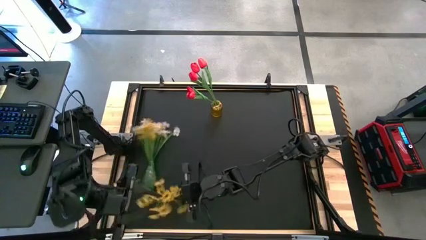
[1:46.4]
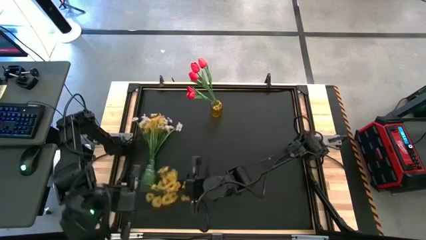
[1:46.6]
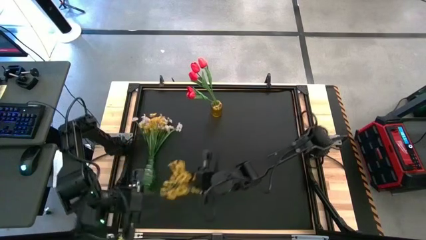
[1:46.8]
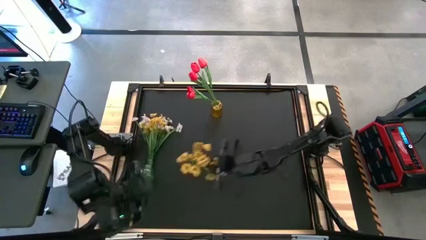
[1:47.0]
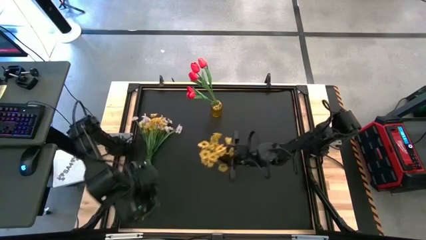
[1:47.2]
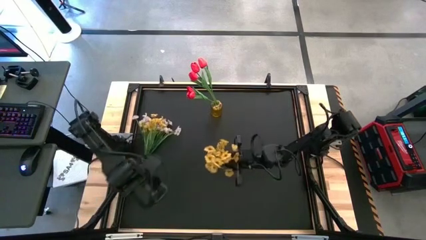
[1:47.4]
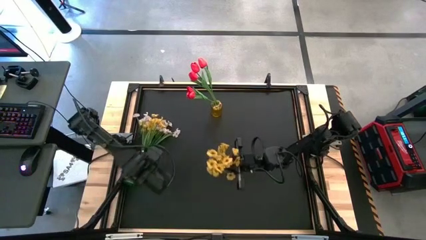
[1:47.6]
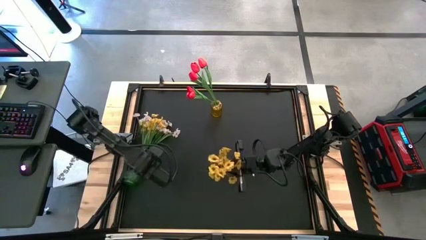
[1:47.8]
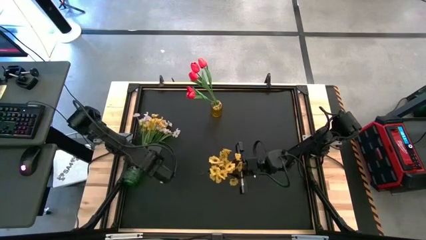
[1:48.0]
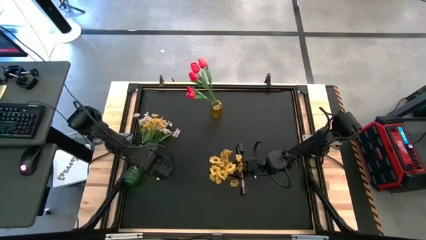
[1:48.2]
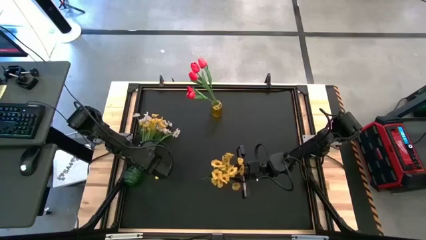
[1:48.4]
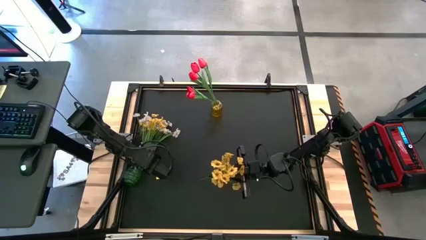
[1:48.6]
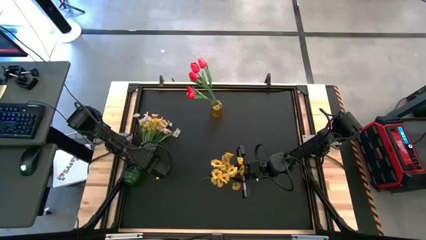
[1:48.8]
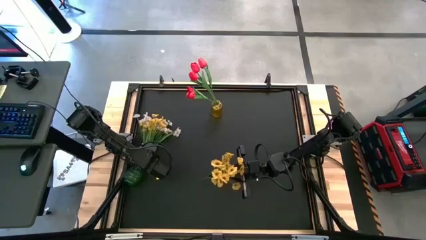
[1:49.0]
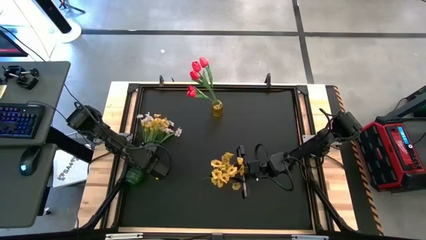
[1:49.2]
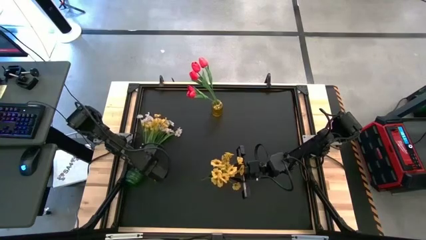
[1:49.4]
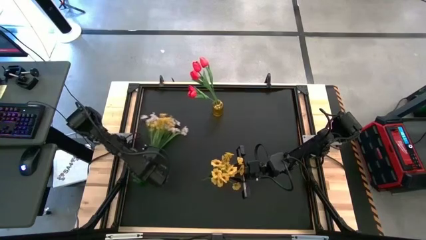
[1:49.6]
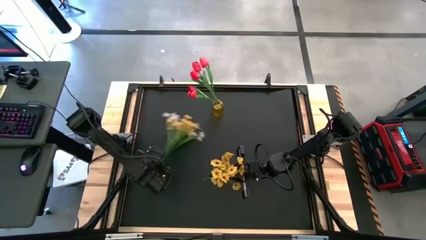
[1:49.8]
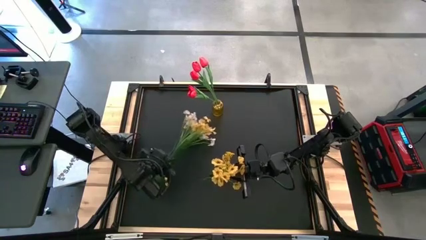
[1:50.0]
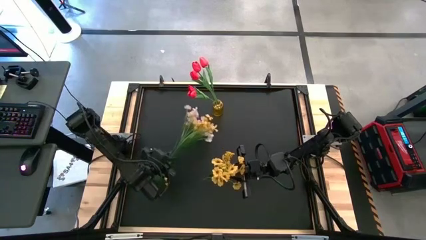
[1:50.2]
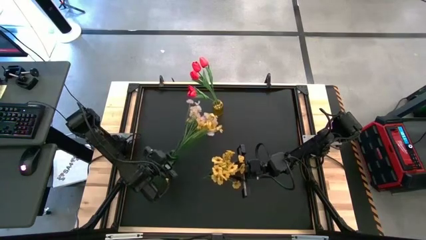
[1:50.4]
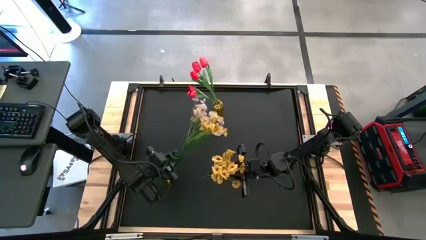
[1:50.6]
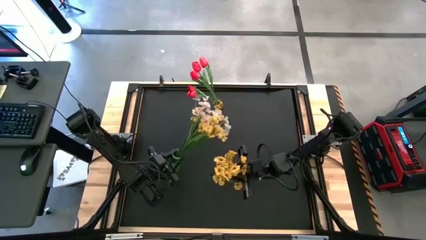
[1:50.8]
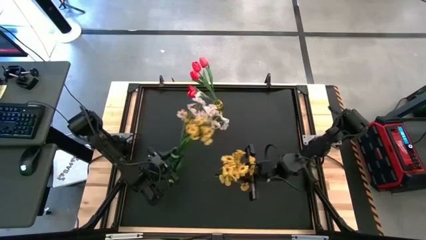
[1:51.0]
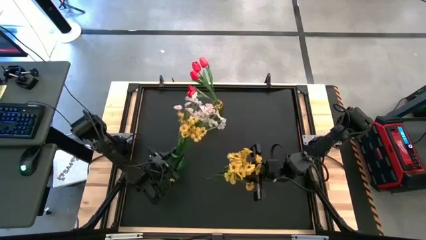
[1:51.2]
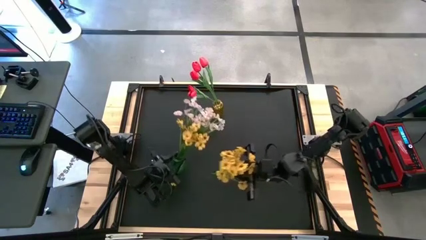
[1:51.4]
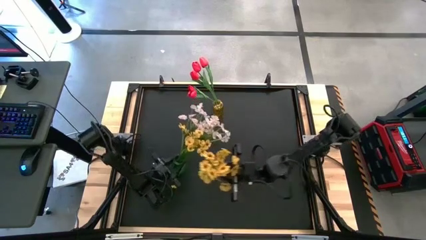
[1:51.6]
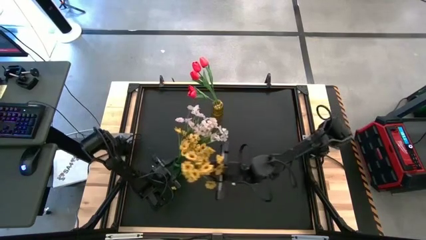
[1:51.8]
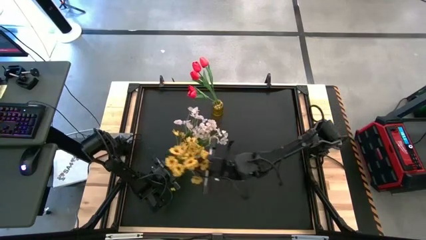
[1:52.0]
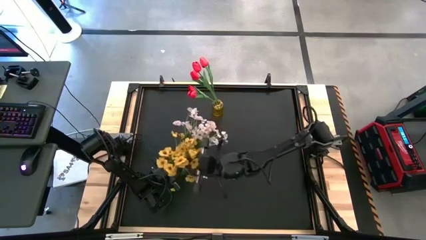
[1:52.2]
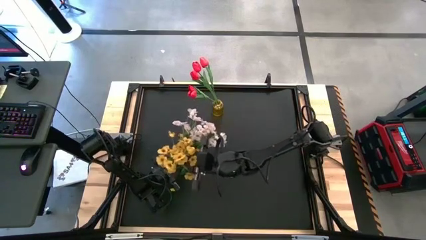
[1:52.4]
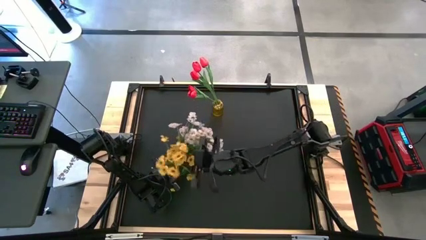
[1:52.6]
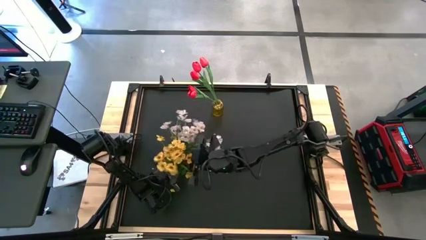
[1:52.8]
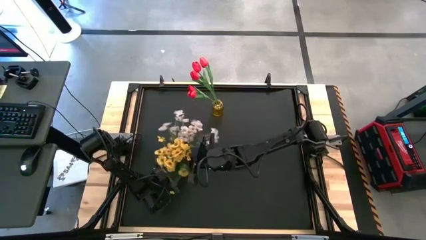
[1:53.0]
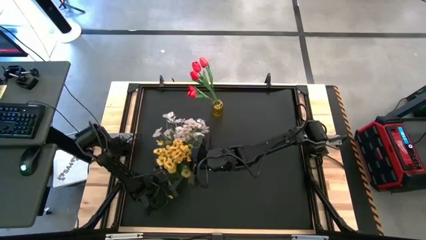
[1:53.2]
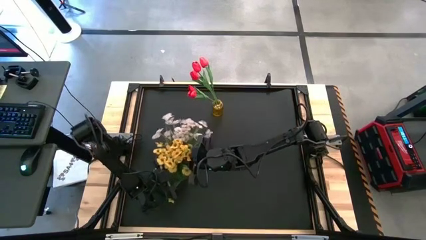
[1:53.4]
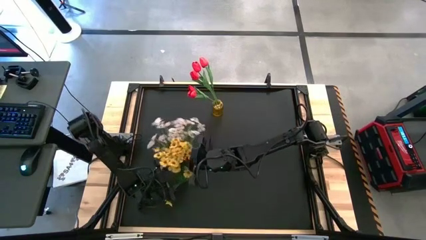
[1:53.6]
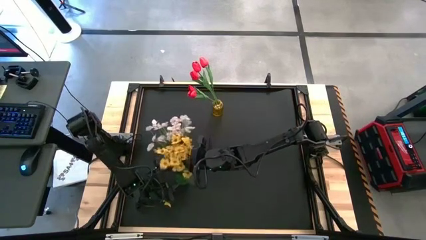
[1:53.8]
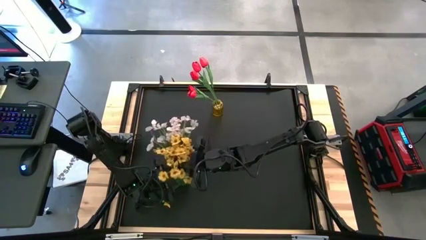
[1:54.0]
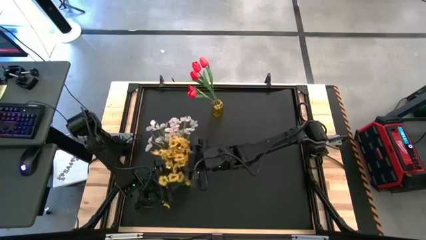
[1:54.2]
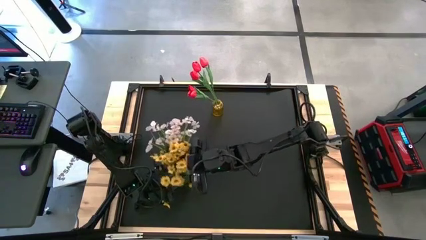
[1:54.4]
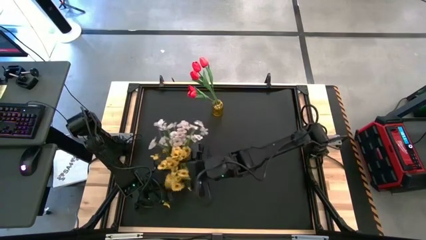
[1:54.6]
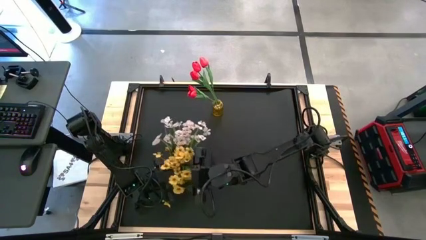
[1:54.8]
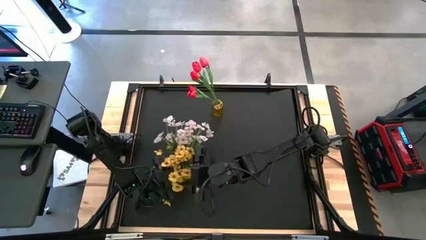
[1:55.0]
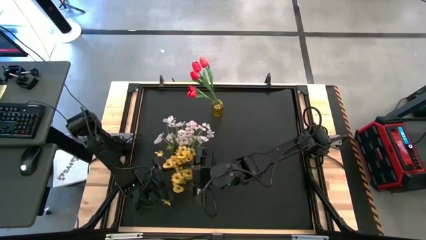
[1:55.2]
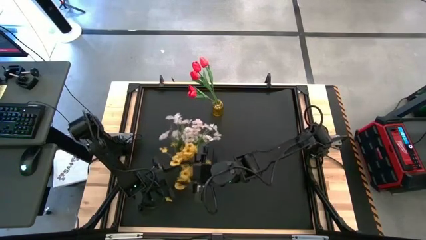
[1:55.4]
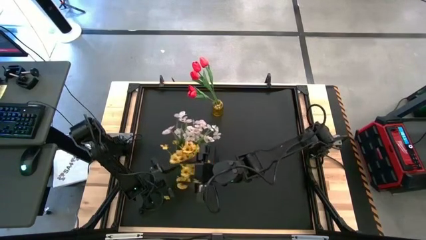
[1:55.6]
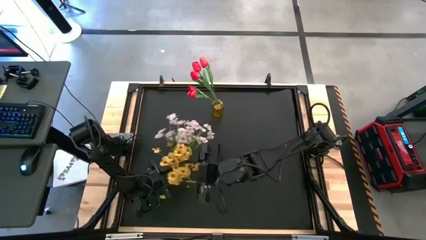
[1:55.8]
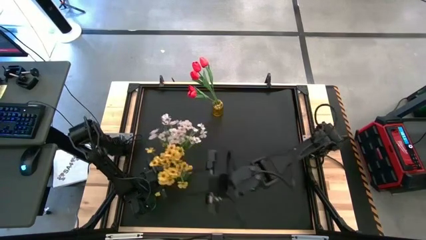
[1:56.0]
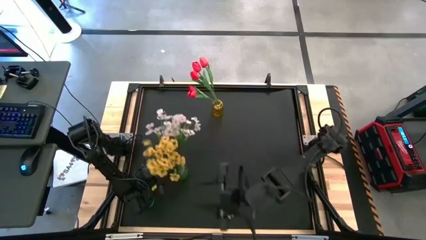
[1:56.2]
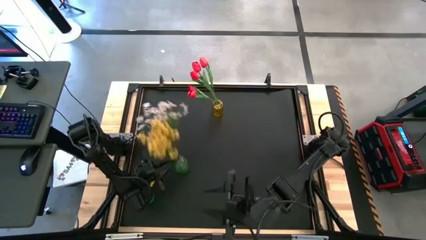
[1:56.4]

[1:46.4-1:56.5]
Task: Sort flowers into vase by color
Put the yellow flowers into the green vase

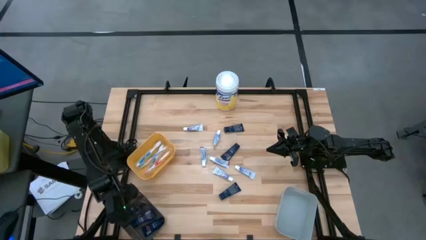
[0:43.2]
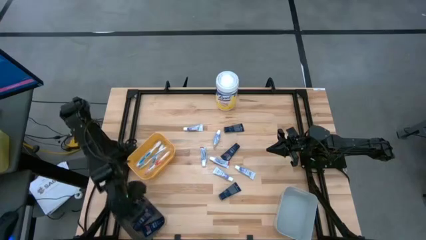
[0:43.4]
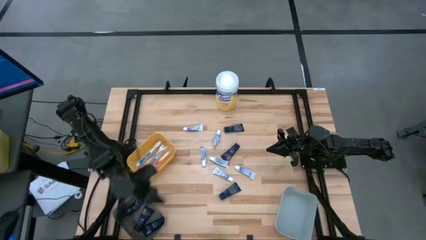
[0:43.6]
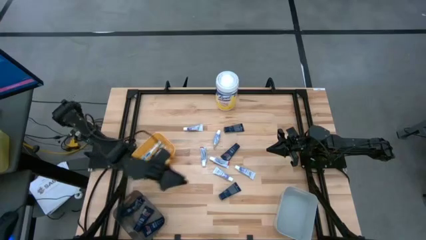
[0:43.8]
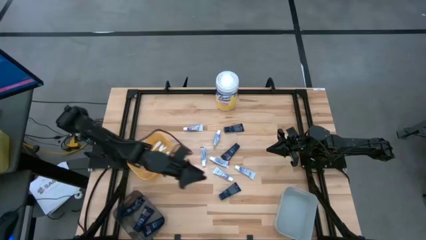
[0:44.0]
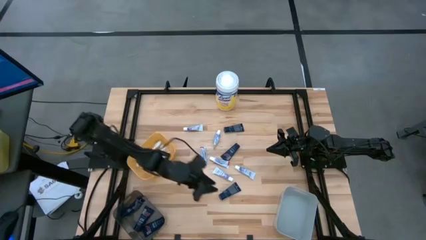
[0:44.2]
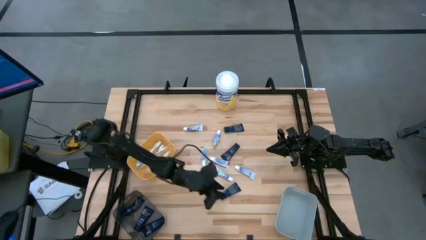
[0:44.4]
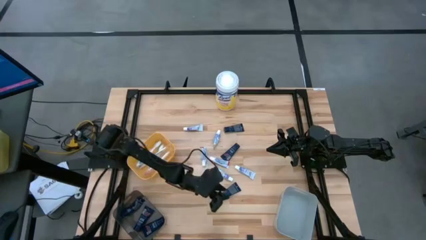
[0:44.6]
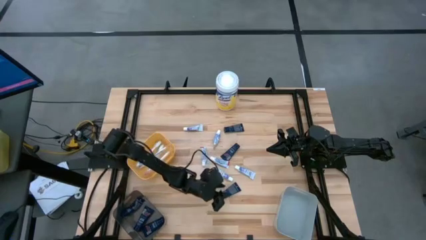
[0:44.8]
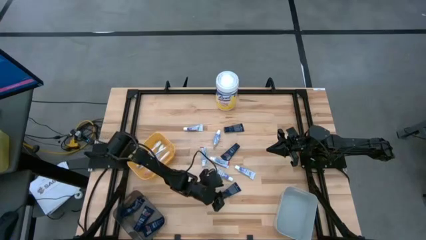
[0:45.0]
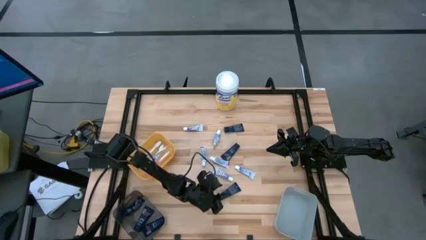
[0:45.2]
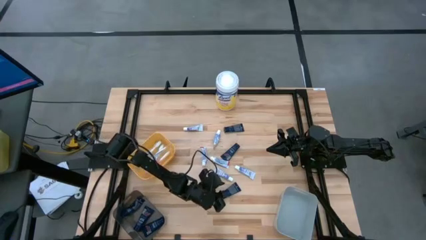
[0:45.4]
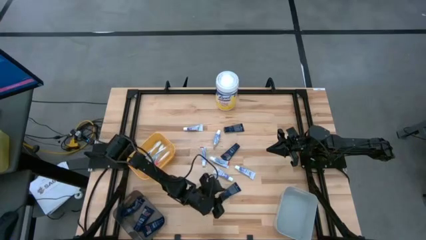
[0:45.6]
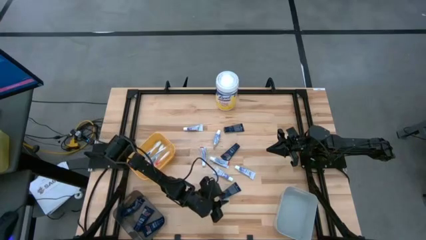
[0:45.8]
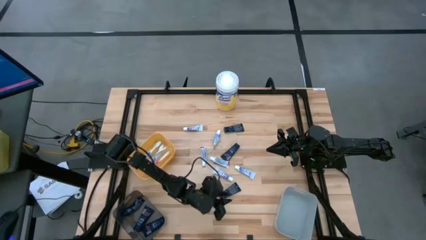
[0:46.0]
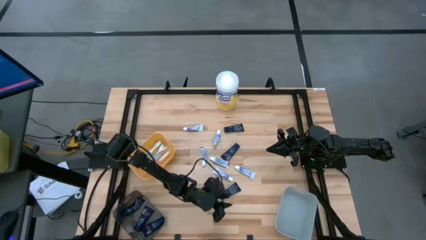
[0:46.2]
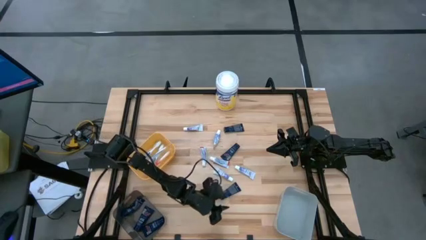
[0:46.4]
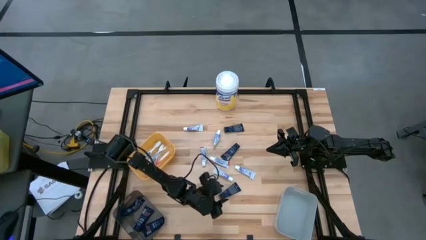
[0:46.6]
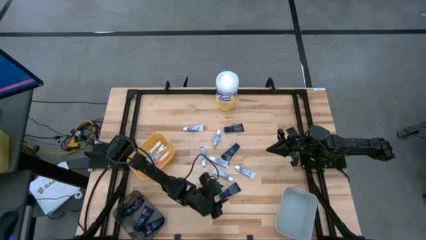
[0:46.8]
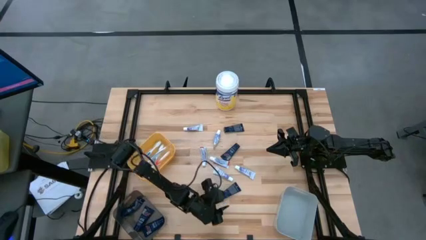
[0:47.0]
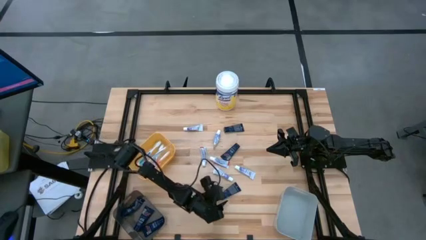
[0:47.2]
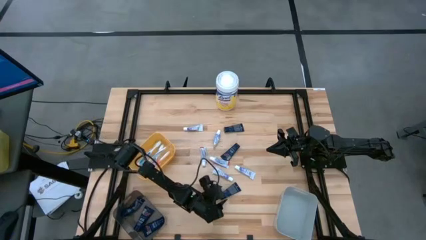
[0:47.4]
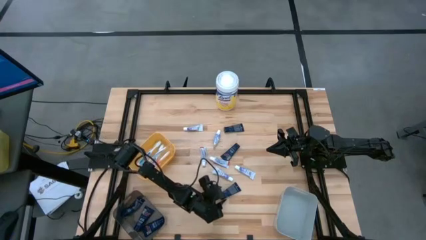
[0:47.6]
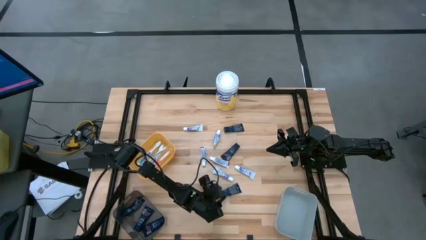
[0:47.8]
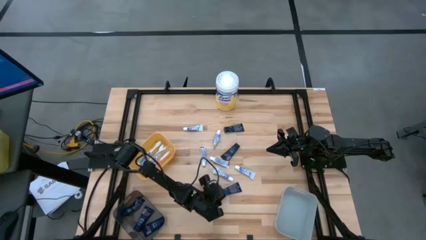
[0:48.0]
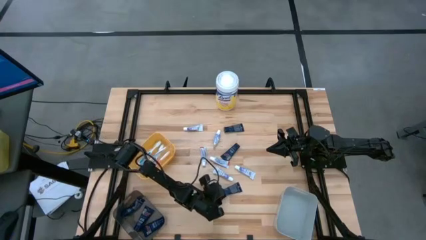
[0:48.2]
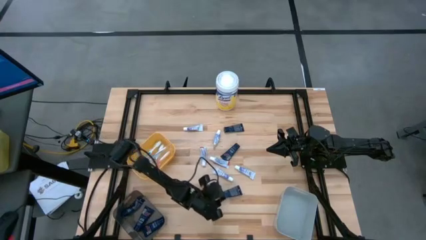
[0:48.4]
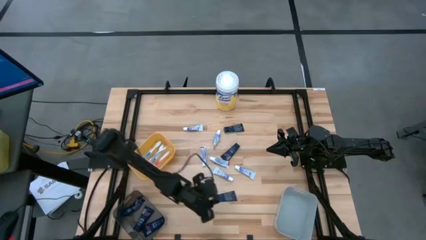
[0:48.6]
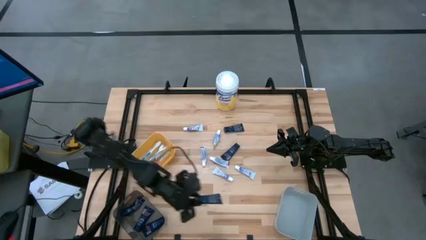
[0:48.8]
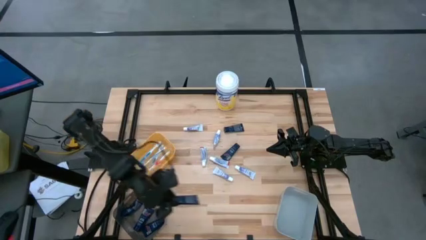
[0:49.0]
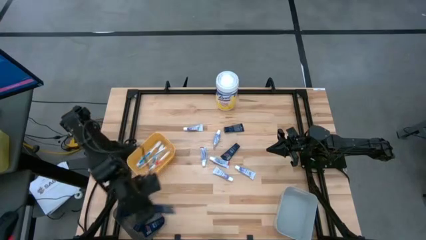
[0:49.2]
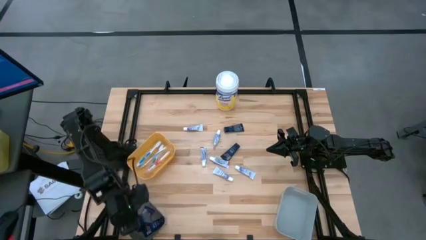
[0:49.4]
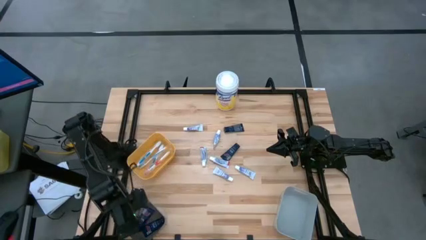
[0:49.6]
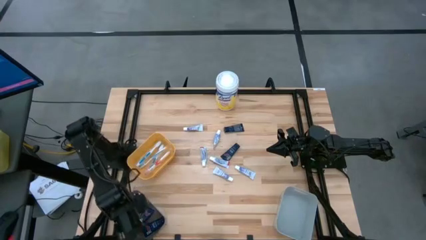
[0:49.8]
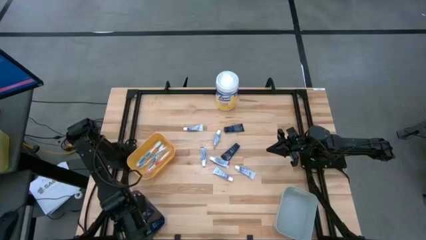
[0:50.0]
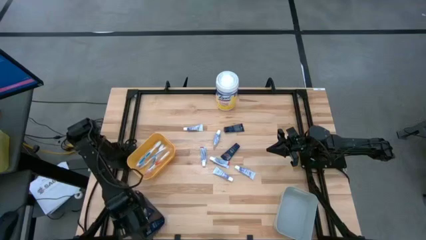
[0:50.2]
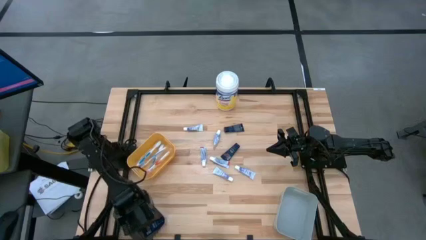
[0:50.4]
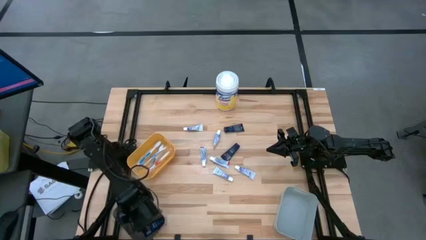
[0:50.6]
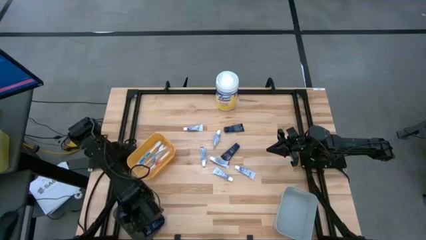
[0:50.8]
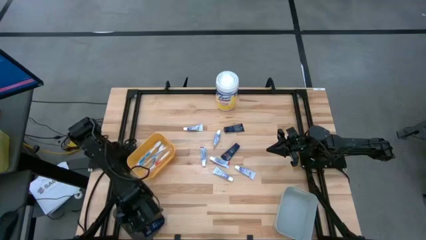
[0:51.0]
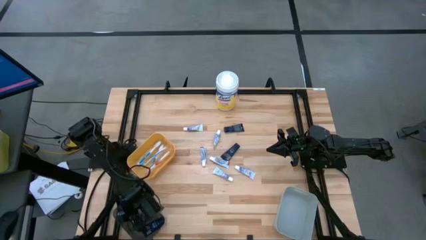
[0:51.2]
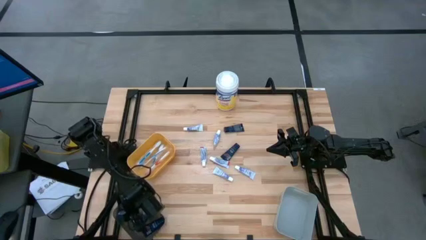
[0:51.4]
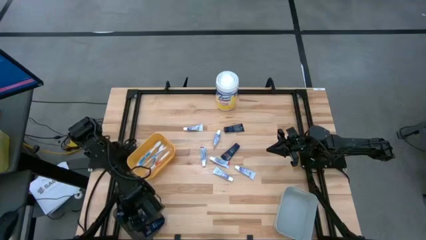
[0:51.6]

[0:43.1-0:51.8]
Task: Pick & Place Travel size toiletries
Put the blue shave cream into the black transparent bin
